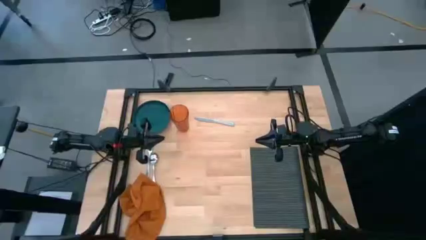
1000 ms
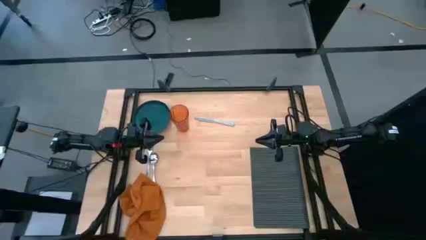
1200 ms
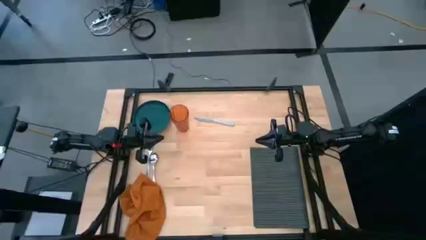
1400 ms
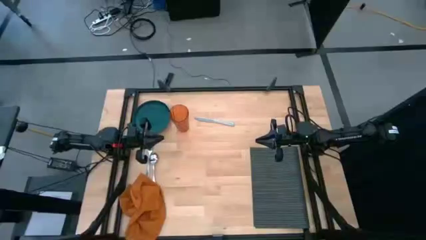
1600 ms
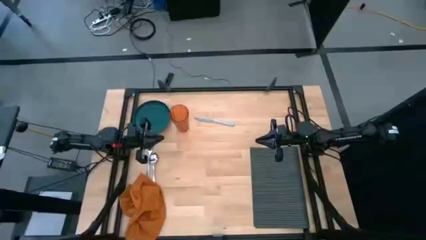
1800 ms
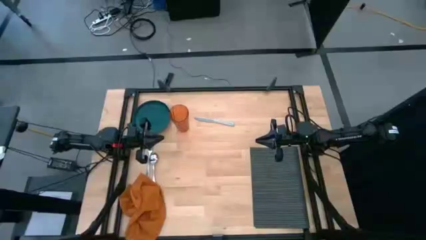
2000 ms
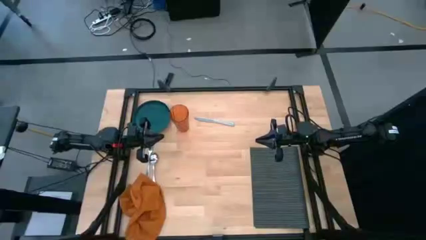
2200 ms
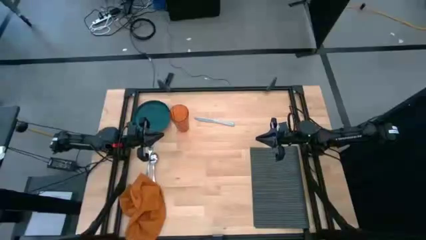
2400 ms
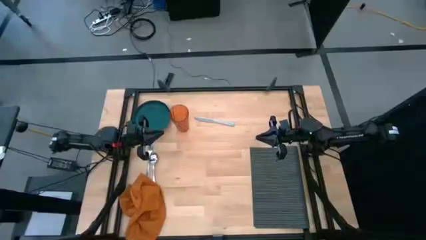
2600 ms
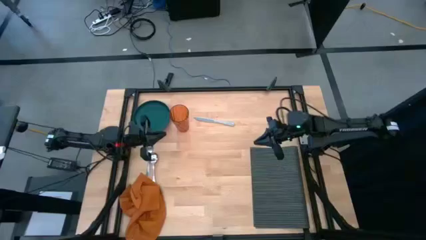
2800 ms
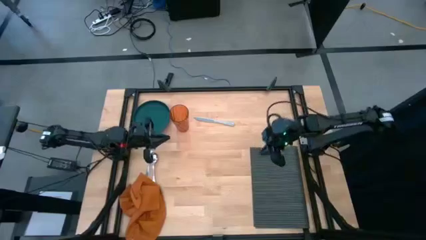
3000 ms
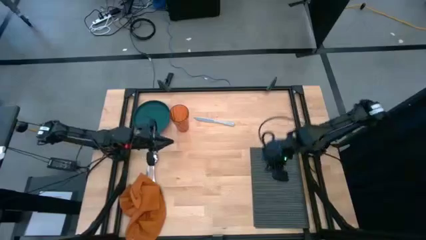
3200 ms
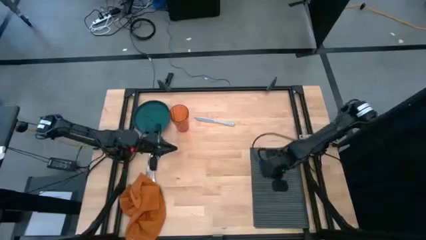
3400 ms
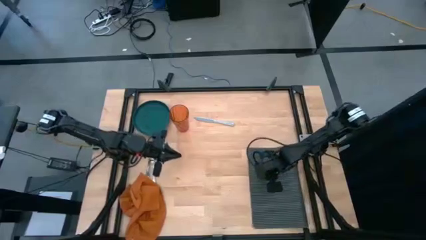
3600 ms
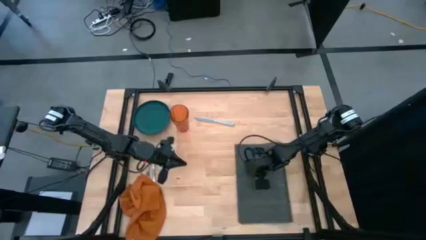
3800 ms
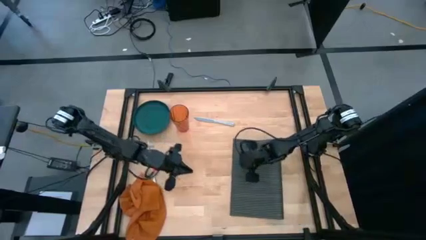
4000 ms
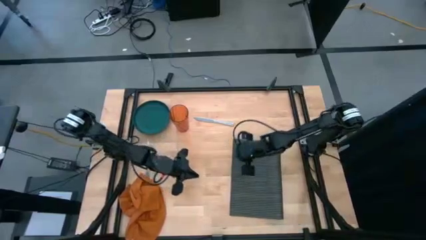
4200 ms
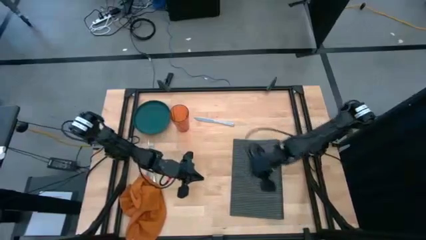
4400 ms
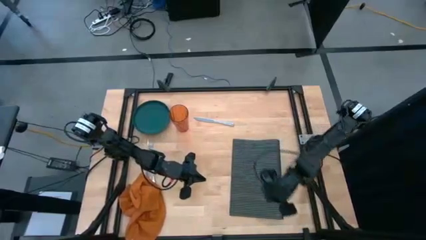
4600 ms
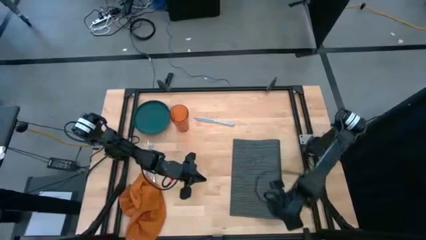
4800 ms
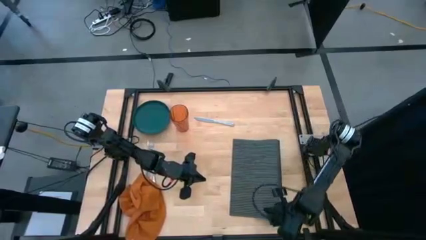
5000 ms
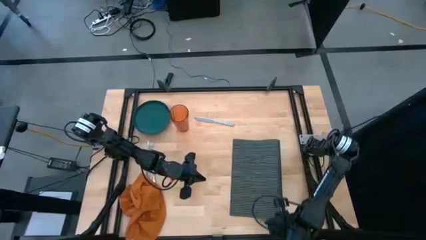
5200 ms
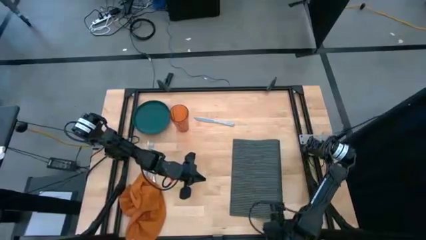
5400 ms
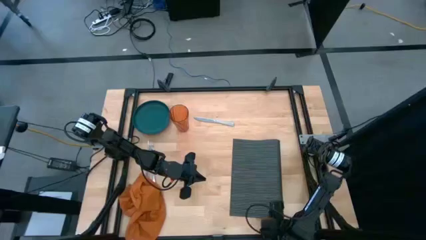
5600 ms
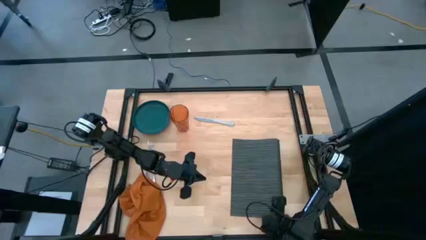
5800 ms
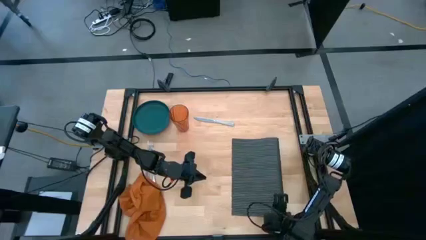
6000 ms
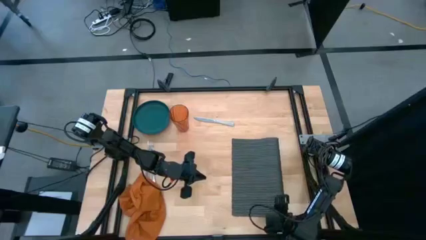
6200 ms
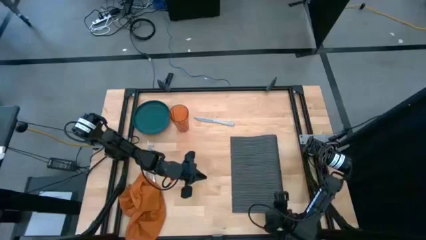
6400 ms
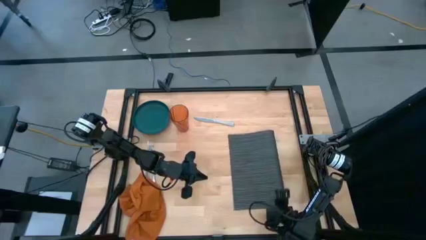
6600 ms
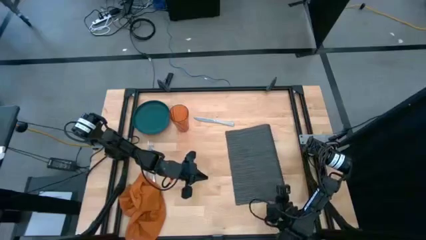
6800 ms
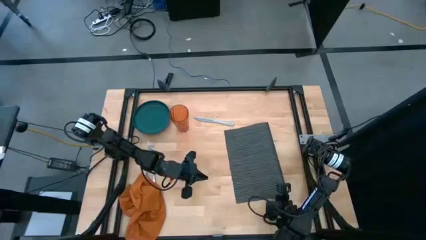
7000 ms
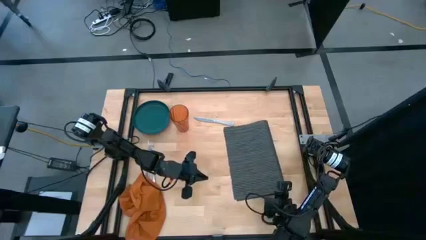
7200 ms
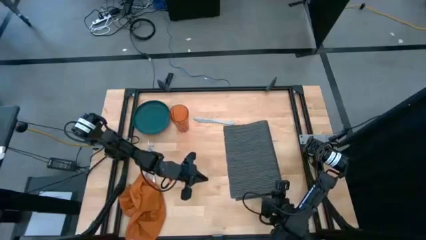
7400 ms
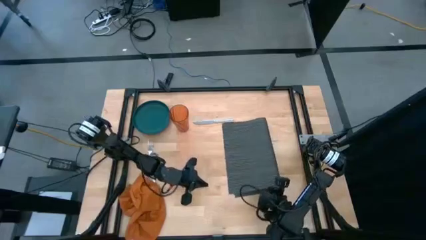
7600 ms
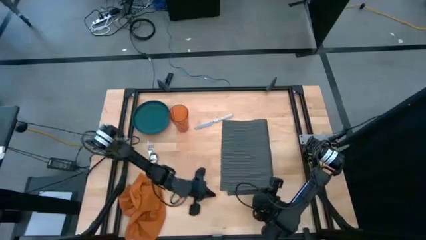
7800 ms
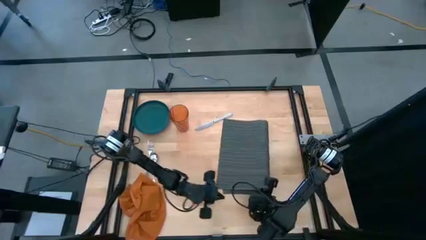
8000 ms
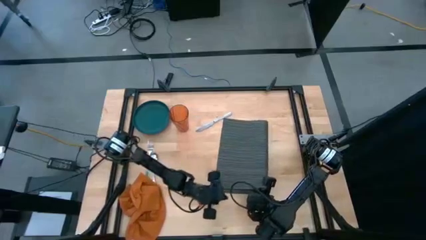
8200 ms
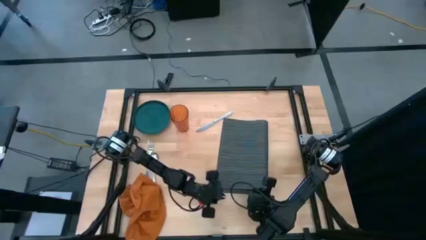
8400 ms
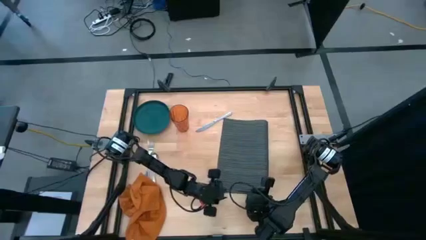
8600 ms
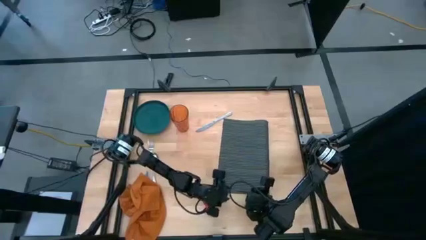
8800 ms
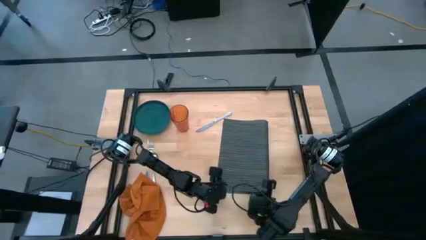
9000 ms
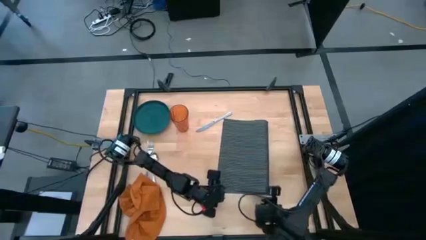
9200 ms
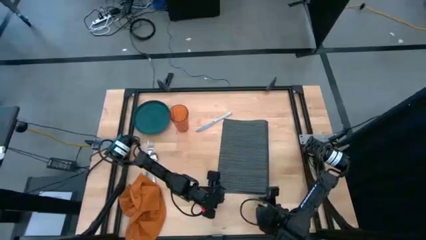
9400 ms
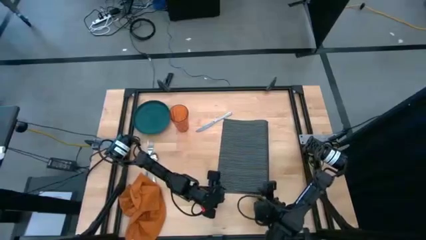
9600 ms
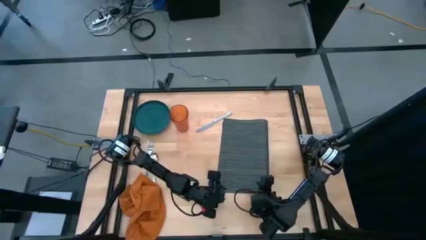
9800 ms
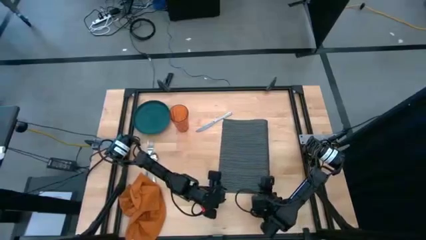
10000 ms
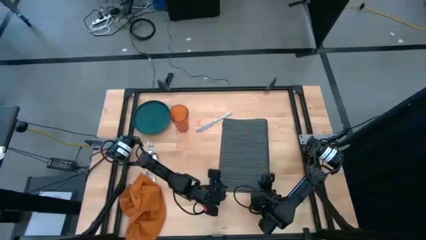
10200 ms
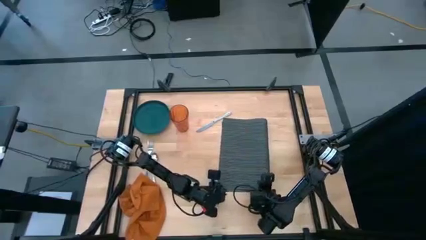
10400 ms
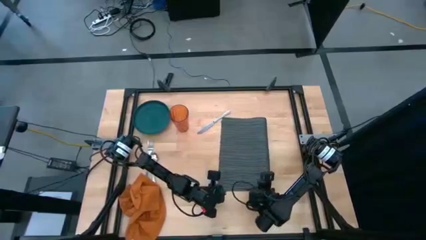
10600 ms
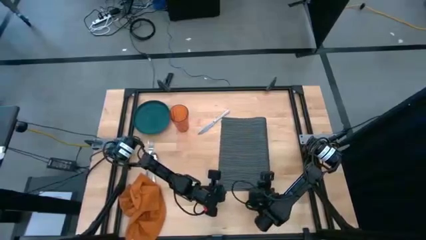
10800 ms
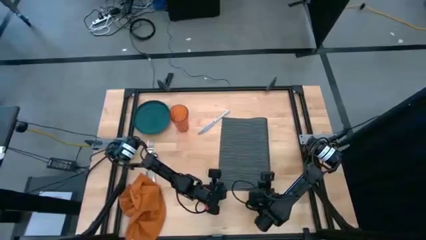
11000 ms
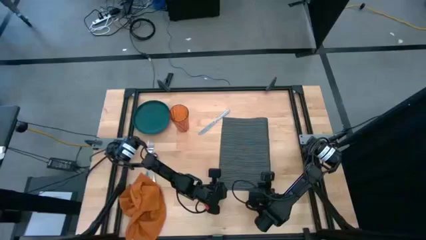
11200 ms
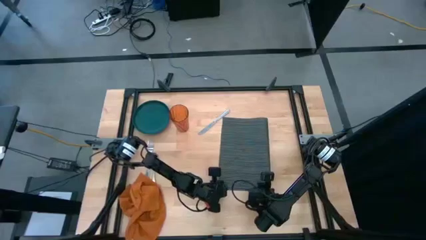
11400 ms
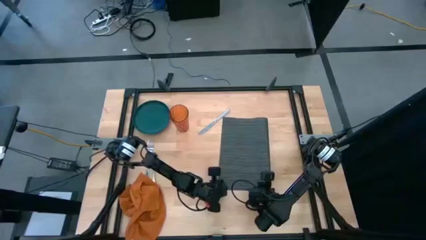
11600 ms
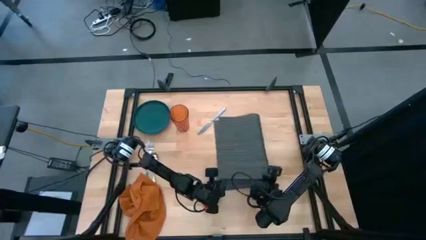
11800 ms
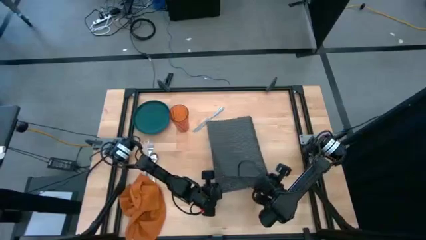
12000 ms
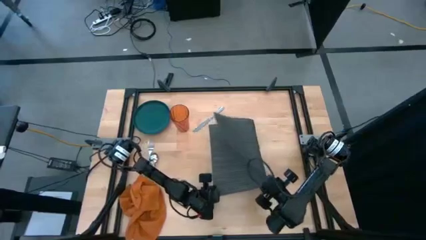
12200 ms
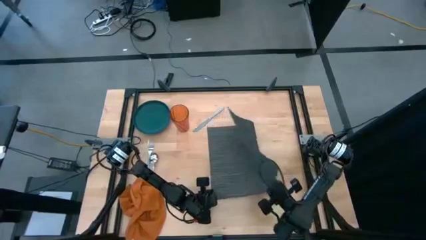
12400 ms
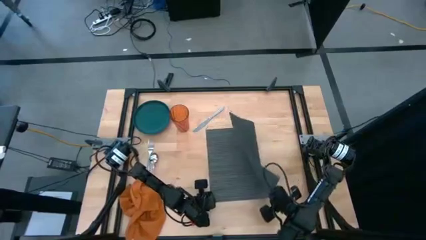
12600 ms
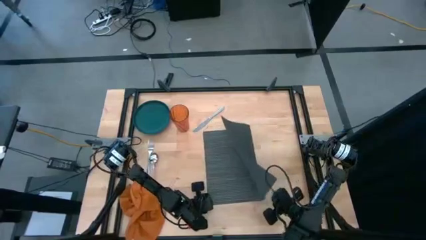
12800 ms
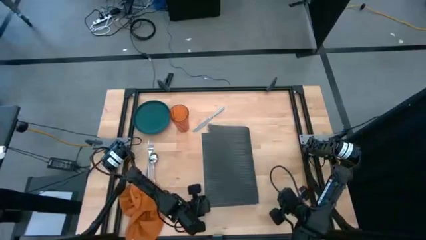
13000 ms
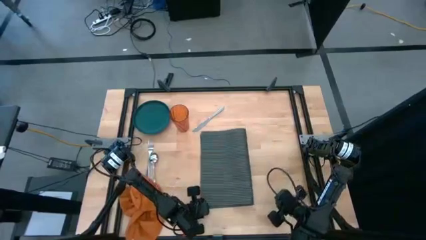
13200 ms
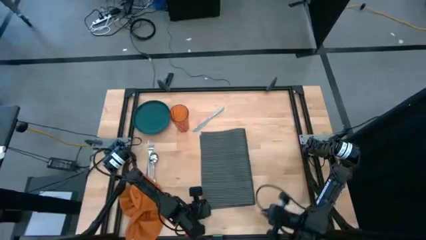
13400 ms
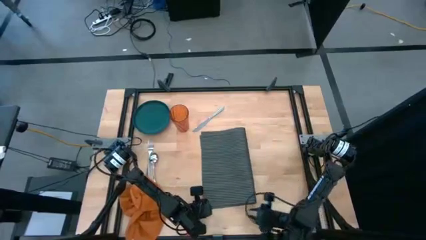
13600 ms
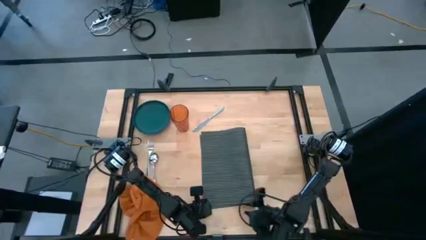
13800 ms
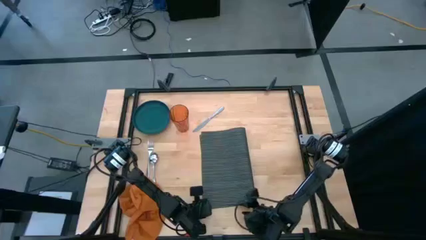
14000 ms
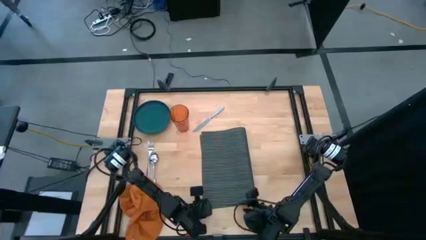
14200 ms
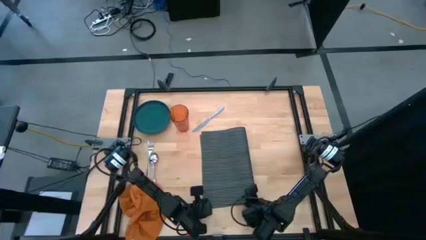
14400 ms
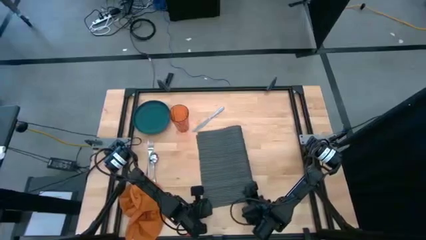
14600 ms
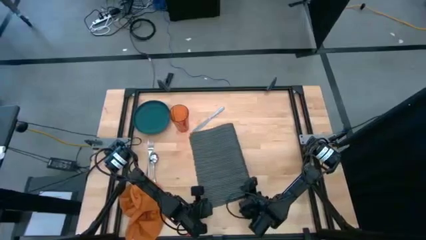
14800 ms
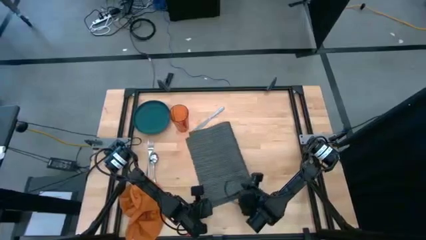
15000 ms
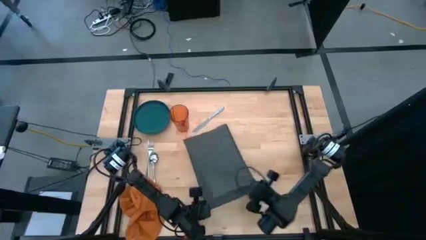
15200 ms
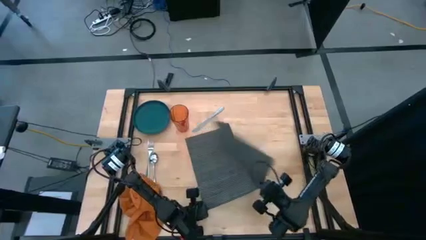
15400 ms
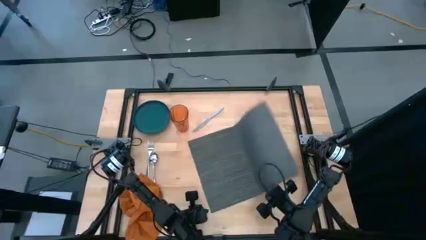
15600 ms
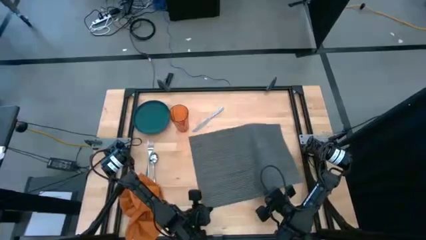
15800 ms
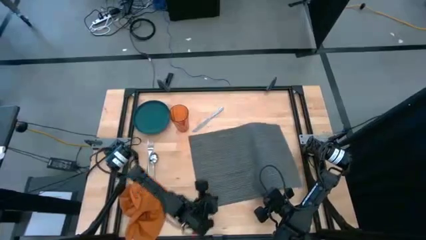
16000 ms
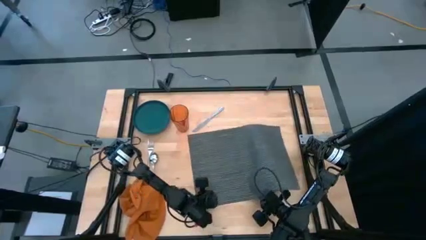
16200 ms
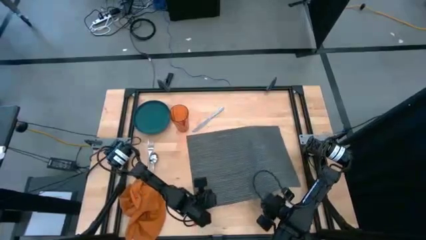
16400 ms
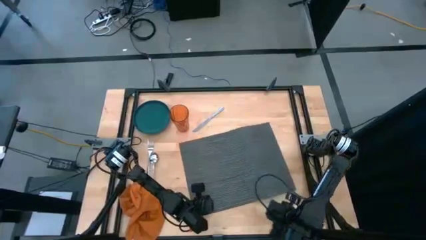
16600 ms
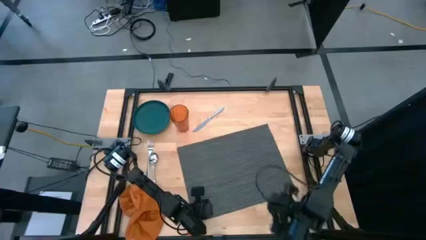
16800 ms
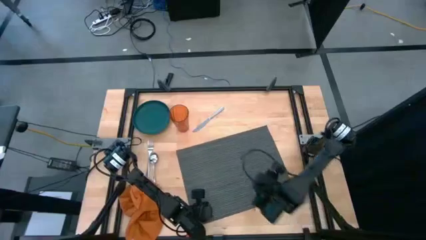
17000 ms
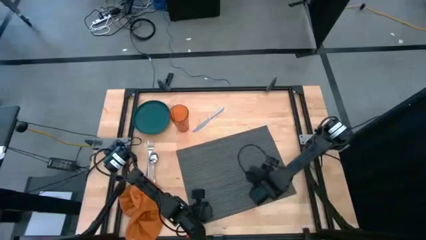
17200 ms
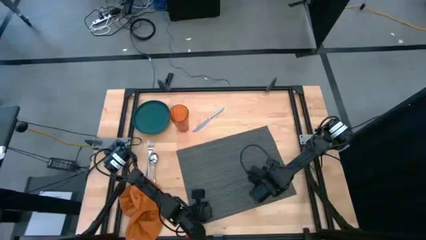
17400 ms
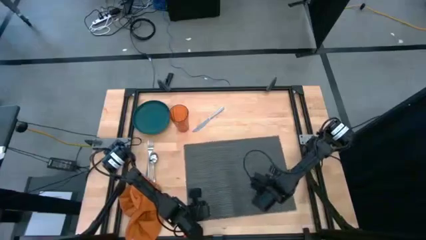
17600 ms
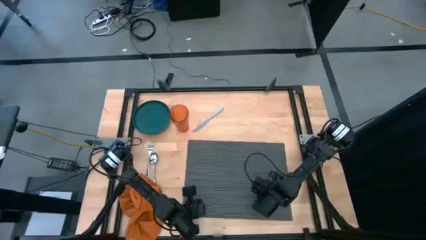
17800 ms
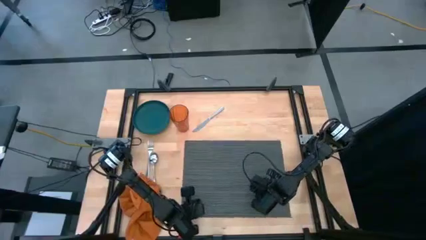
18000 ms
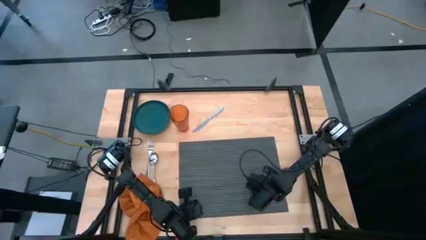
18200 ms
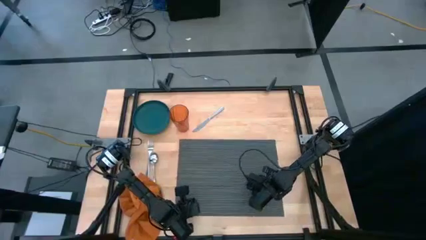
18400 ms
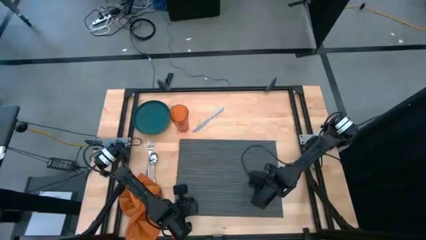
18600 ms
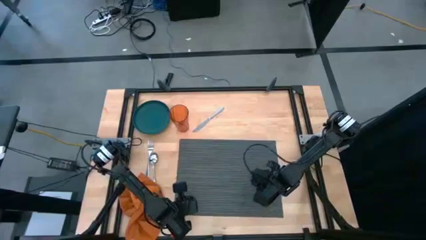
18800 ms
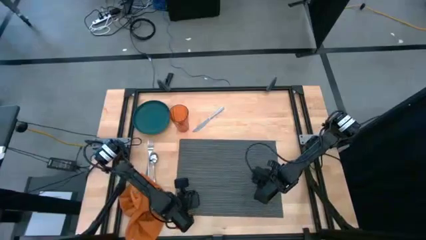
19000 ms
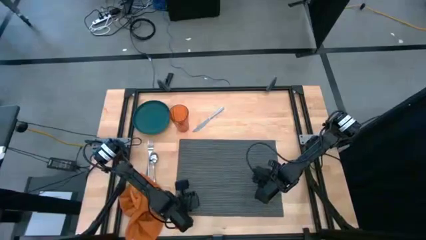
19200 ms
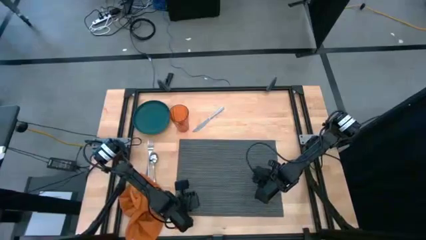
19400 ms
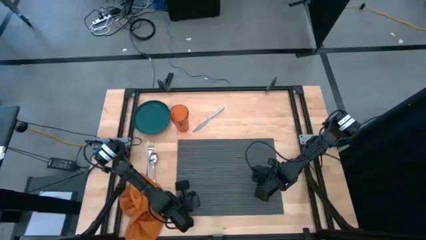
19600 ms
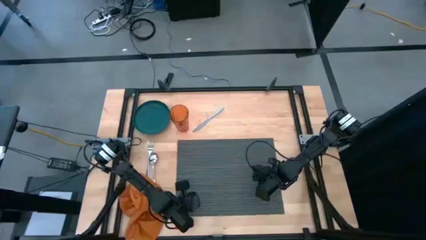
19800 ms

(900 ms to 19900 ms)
Task: Set table place
Move the black placemat to the center of the table
